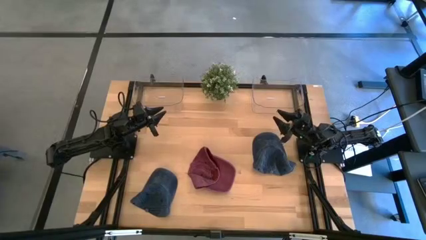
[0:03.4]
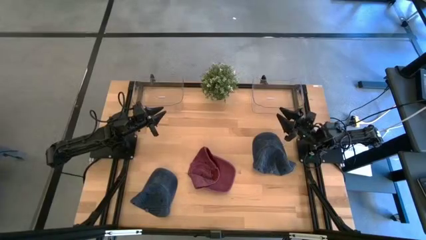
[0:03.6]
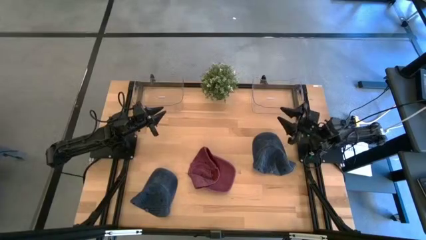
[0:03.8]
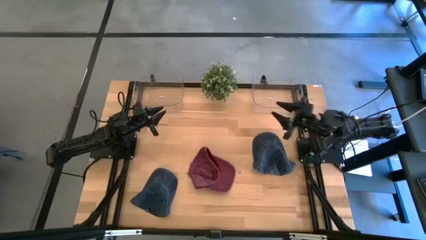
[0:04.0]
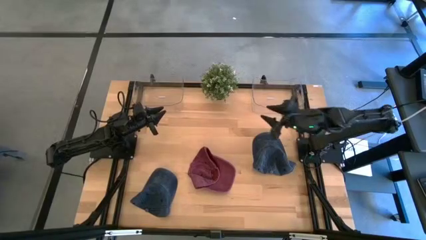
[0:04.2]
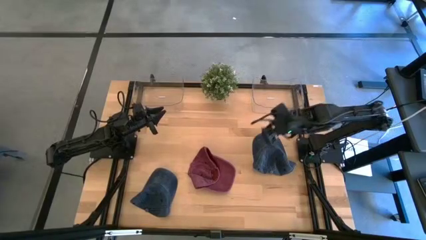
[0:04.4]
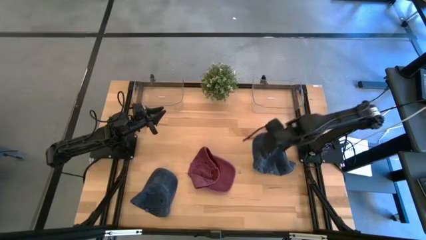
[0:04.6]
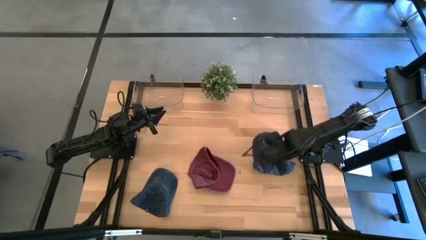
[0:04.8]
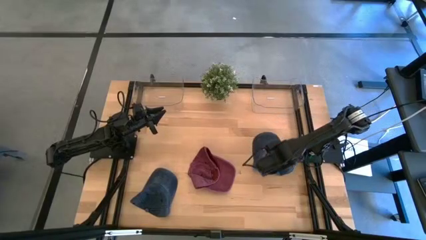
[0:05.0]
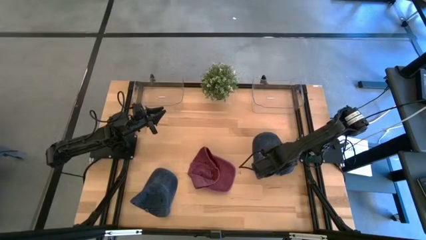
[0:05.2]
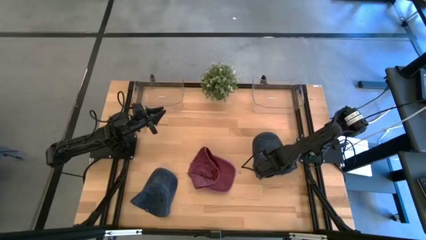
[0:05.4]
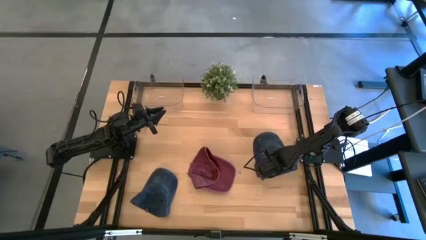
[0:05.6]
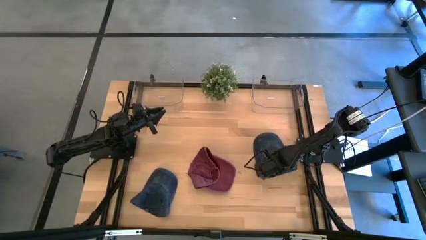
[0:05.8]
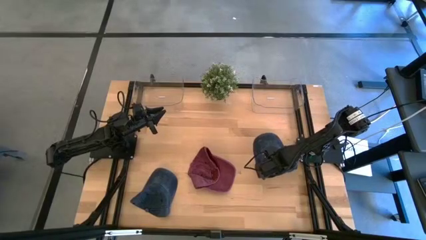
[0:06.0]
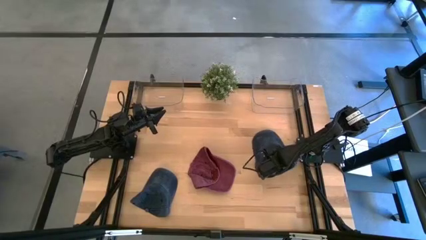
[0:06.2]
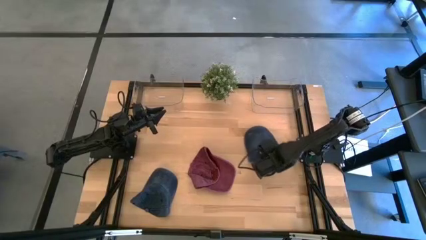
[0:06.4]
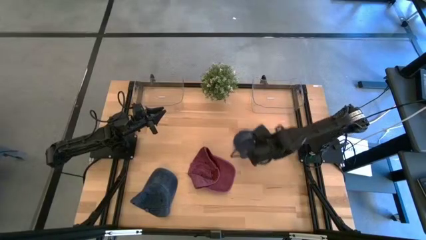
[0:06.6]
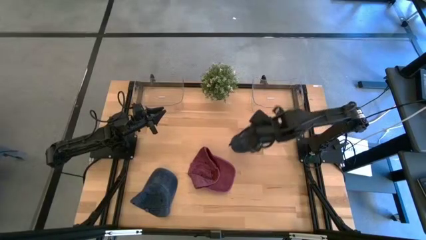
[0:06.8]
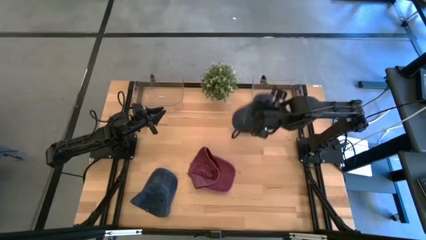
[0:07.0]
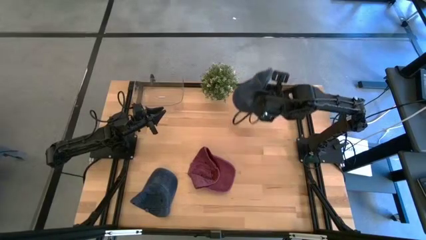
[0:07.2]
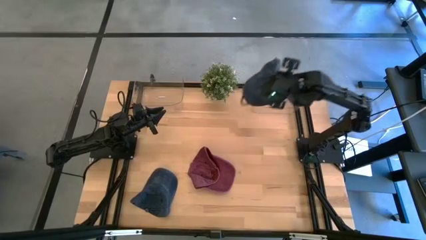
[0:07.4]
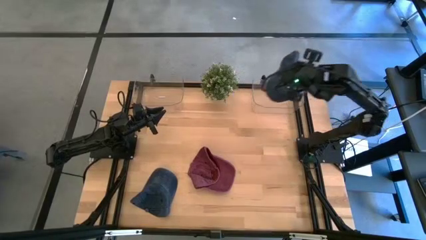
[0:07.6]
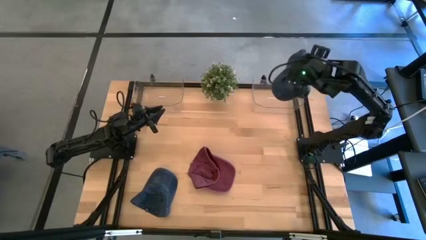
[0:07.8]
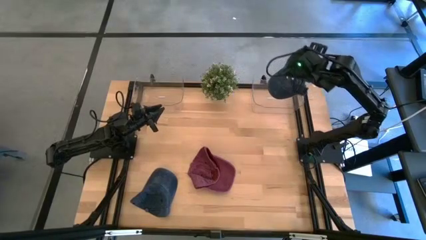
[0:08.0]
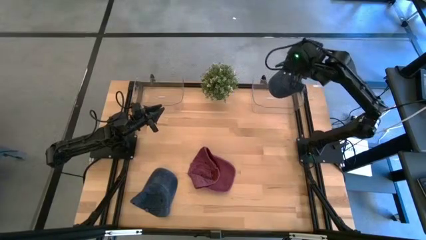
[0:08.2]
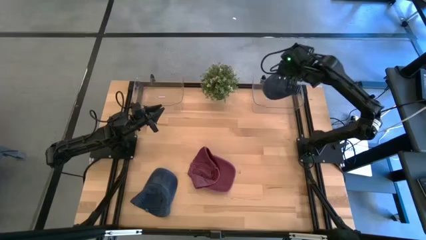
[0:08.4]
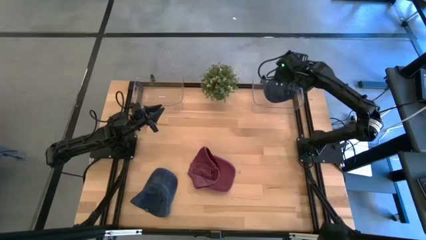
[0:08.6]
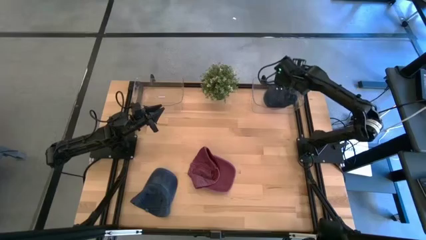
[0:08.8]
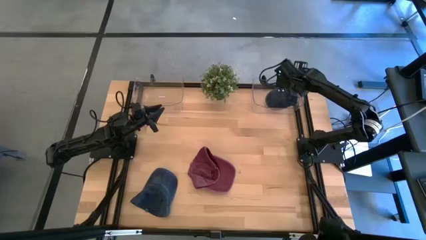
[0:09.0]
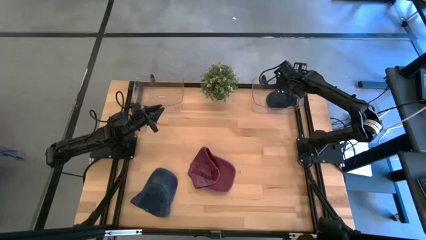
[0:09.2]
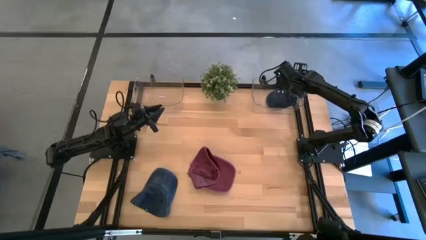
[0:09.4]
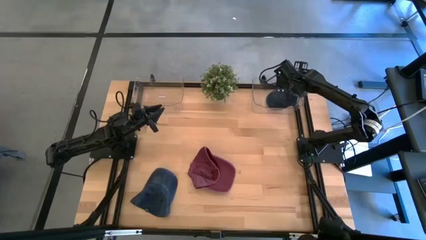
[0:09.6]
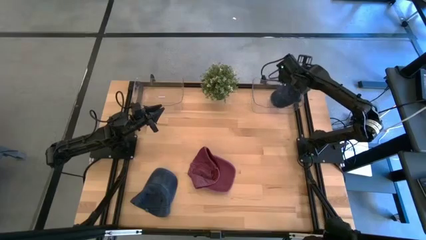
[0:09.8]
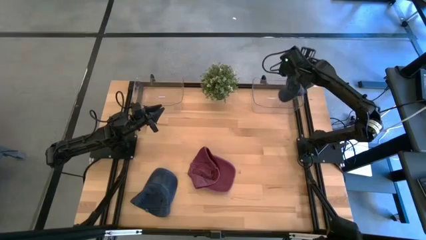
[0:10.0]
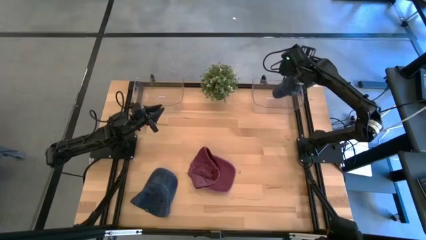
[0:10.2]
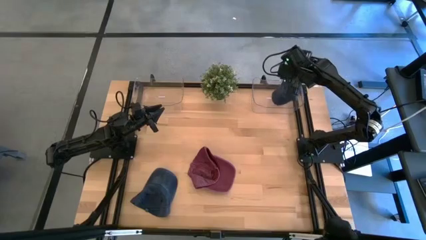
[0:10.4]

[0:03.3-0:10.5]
Task: Pick & Place hat
Put the blue cap into the right transparent bin

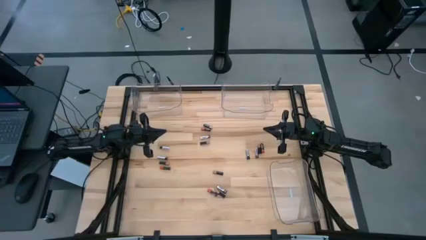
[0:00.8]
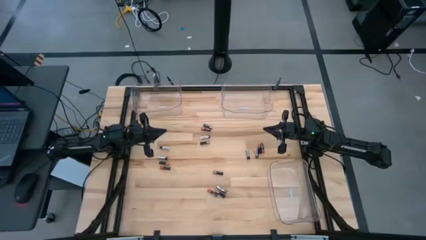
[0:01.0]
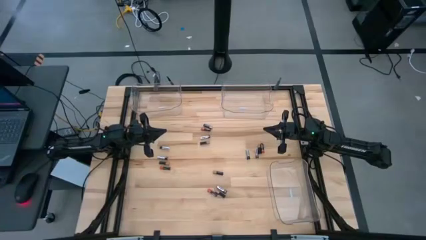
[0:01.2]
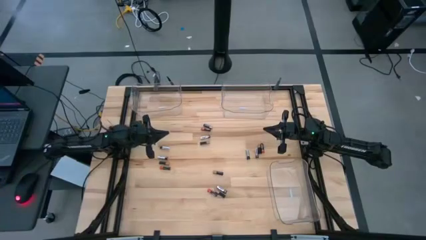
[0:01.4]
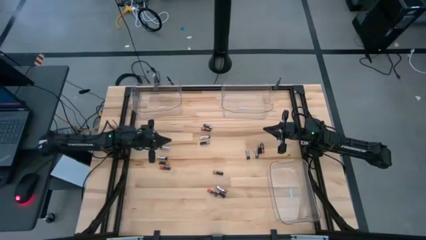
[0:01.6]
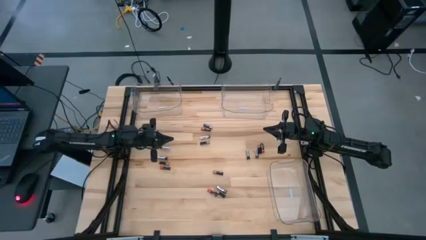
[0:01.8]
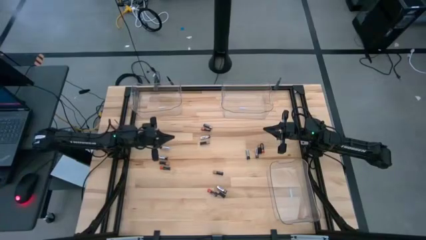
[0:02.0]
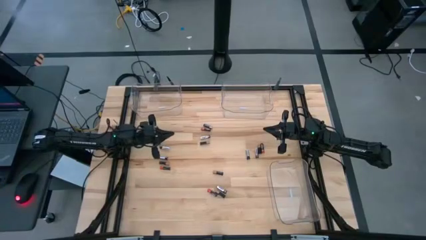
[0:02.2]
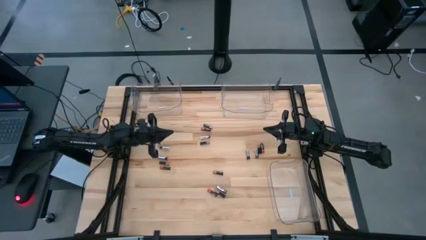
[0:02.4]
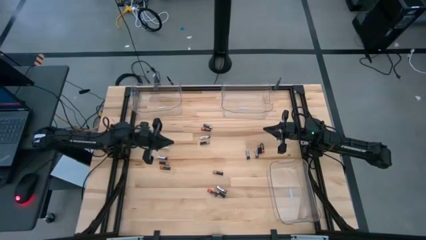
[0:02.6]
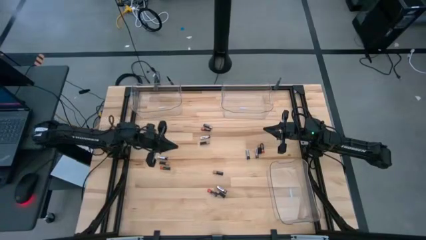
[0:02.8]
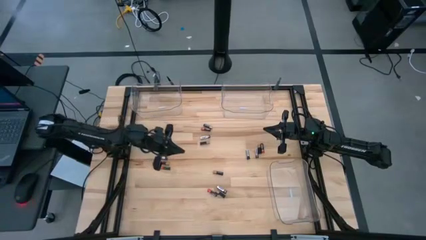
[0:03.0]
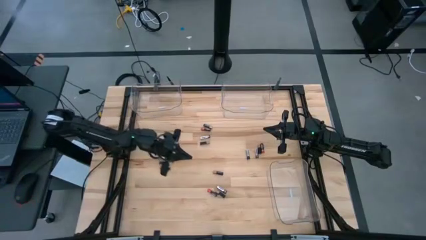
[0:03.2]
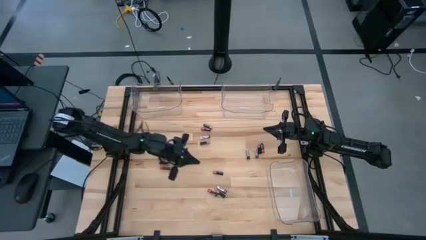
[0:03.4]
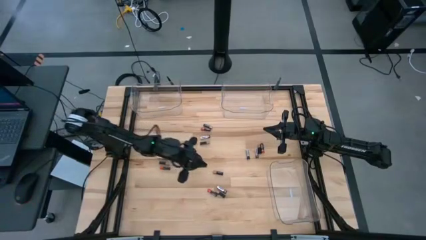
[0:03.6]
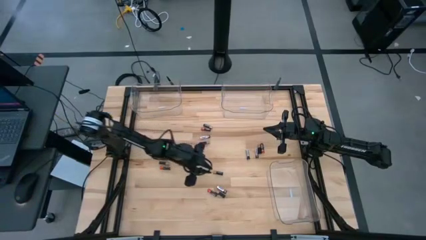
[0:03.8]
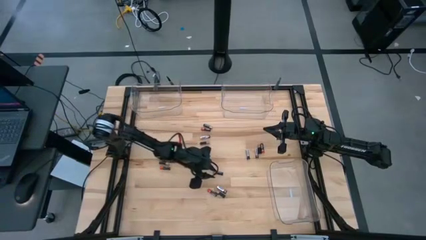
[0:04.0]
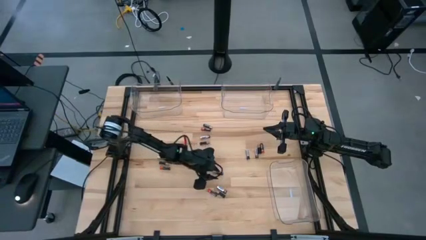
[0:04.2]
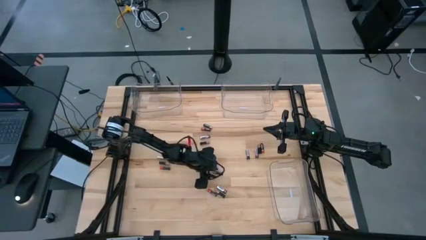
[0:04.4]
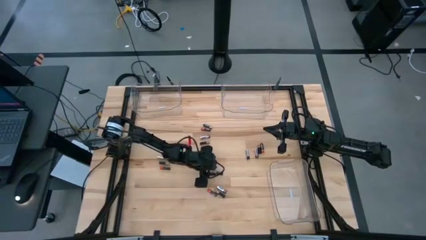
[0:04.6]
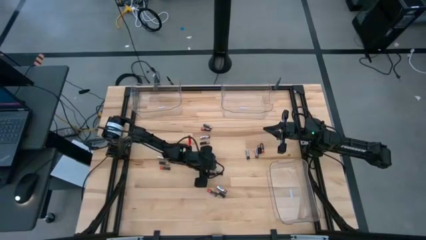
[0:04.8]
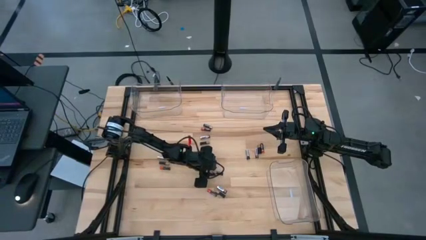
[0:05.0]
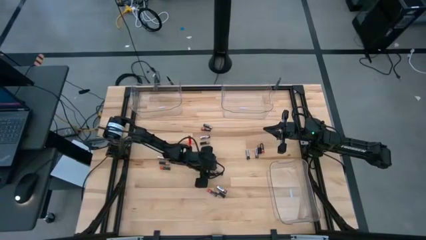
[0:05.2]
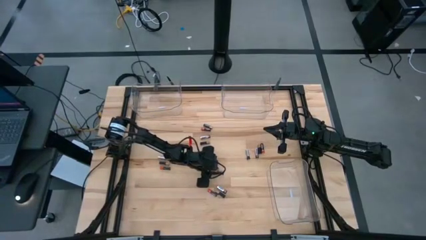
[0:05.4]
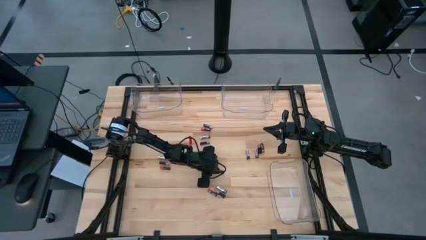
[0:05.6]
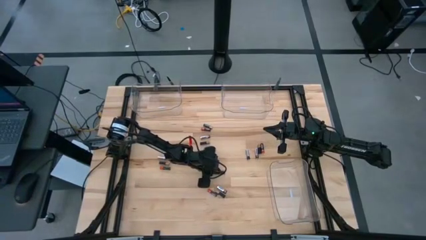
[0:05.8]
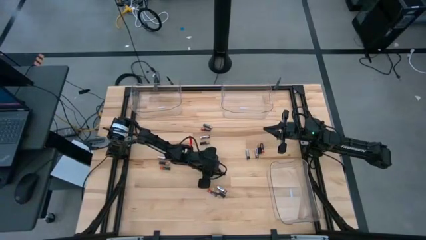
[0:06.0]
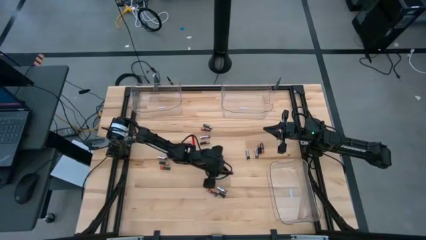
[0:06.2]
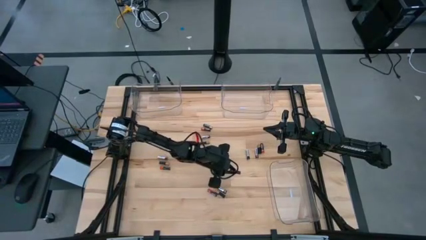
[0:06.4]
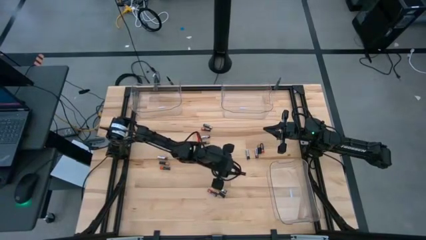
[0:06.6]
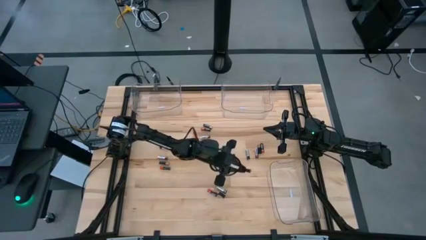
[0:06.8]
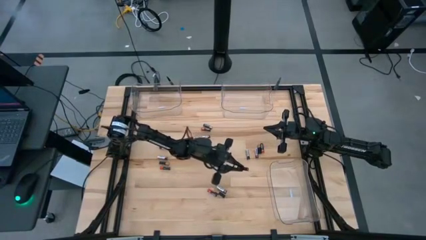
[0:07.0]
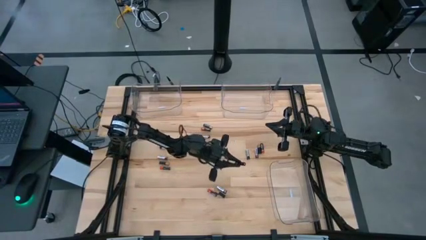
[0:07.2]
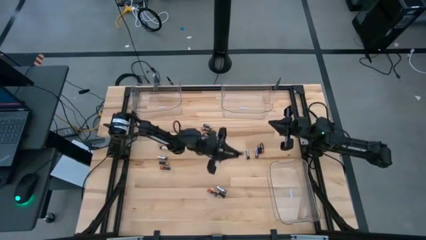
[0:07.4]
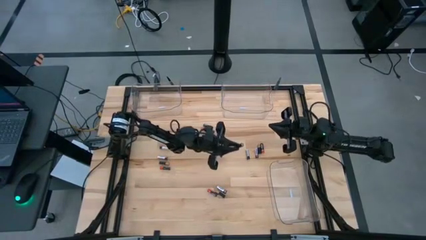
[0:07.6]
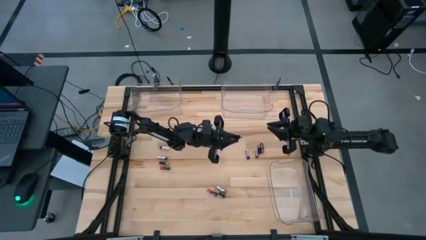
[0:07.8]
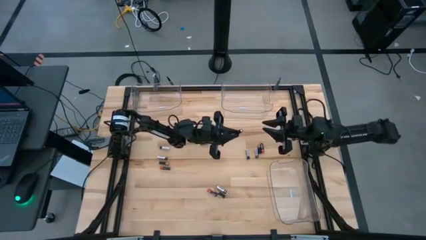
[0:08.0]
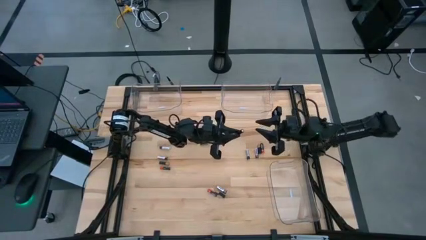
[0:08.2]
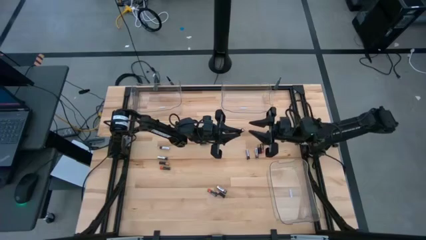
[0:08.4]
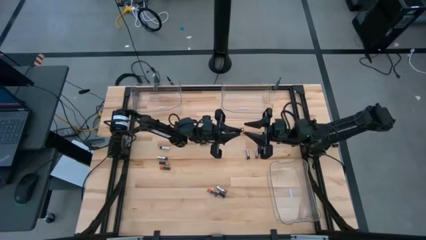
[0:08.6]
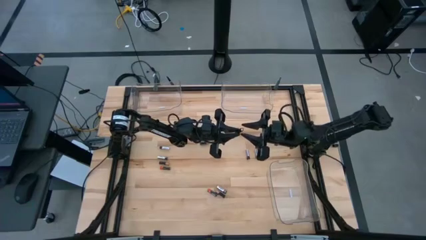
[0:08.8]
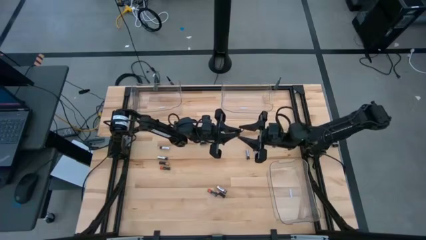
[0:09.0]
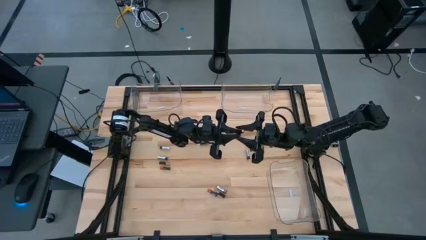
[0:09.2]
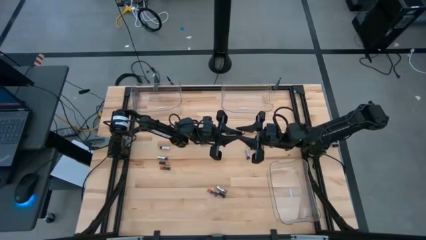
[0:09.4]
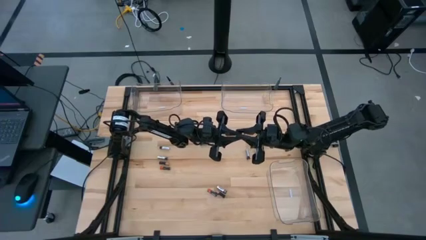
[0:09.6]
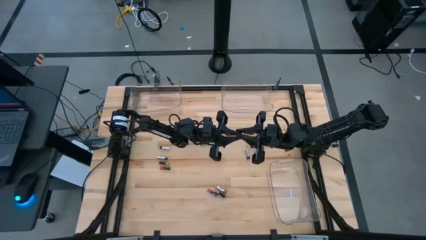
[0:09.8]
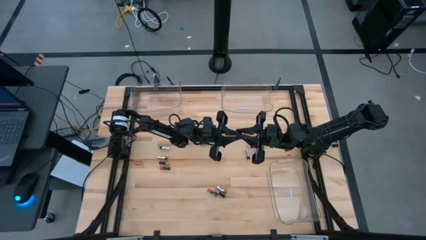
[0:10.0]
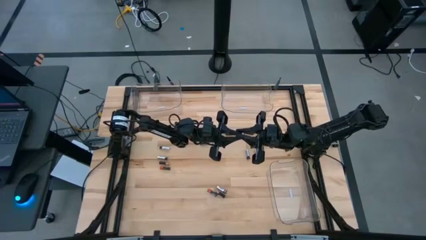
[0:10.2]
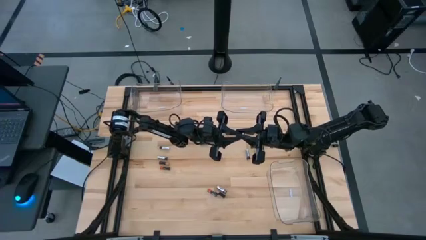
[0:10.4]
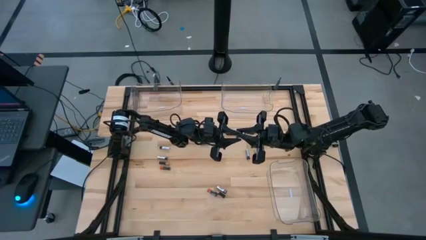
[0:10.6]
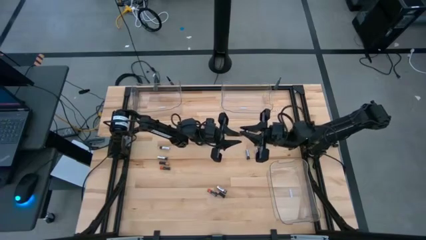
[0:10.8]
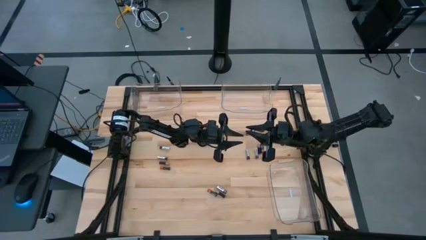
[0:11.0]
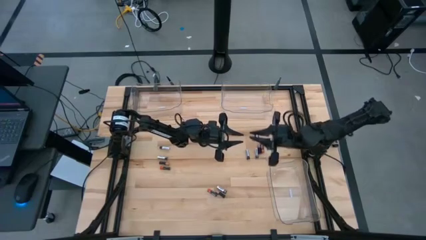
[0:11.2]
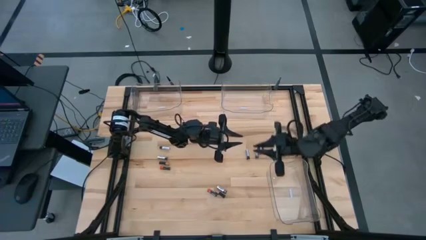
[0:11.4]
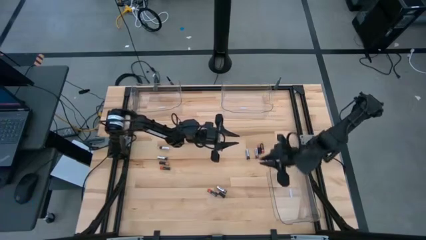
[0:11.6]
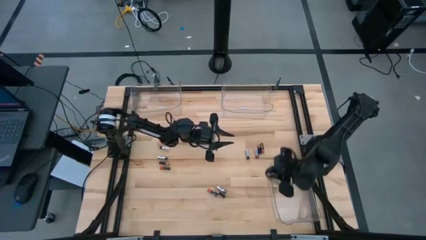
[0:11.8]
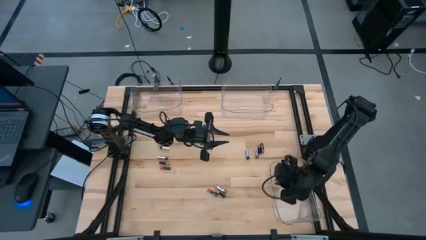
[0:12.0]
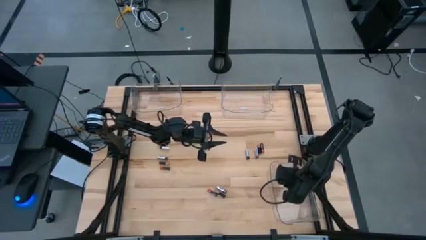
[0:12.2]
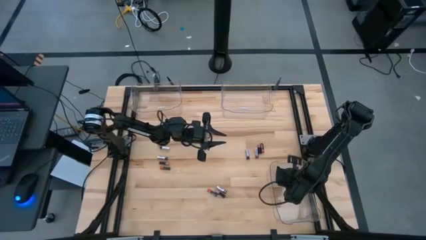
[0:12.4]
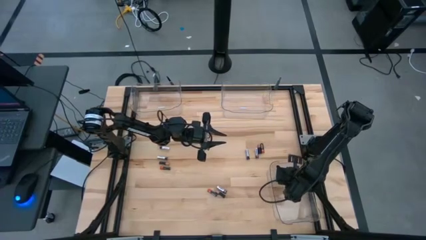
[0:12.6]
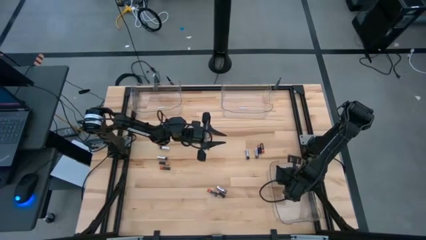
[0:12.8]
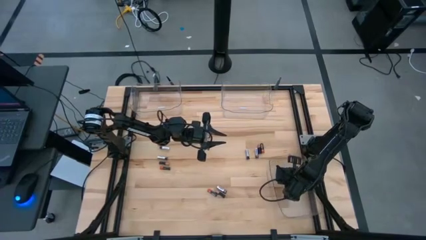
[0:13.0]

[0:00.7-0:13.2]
Task: Sort batteries
Put the brown battery into the bottom right transparent bin
